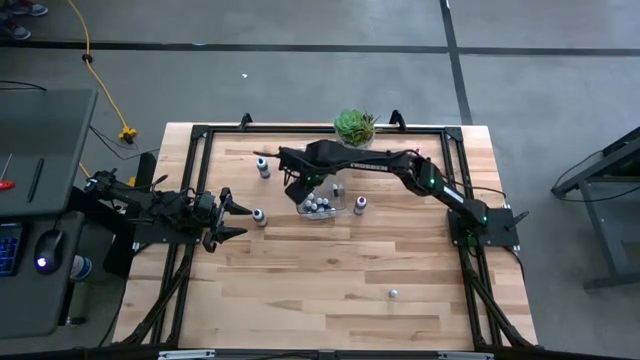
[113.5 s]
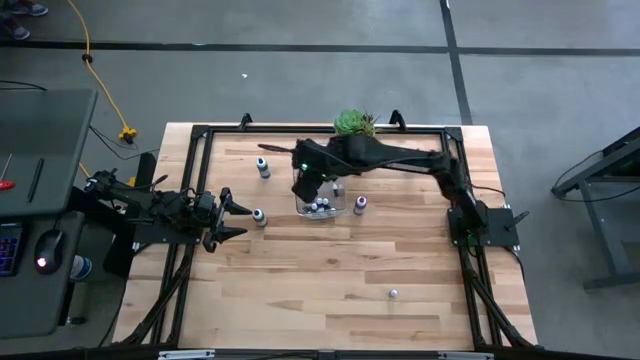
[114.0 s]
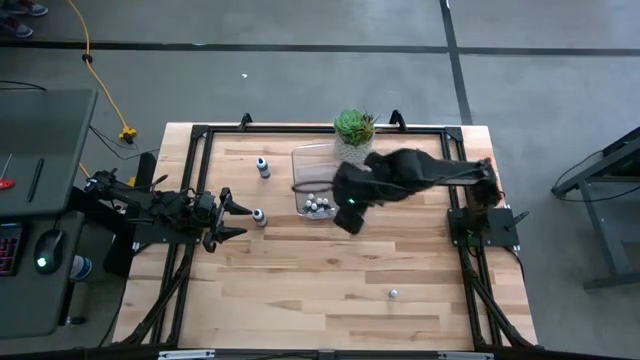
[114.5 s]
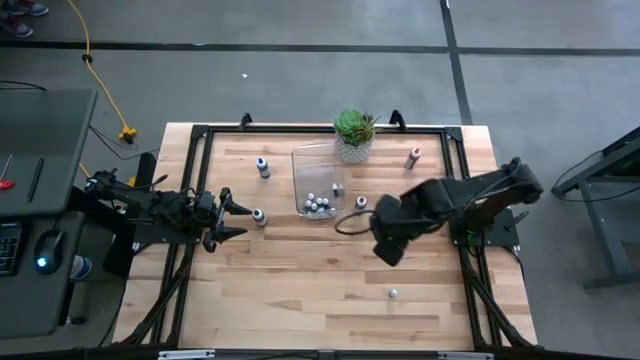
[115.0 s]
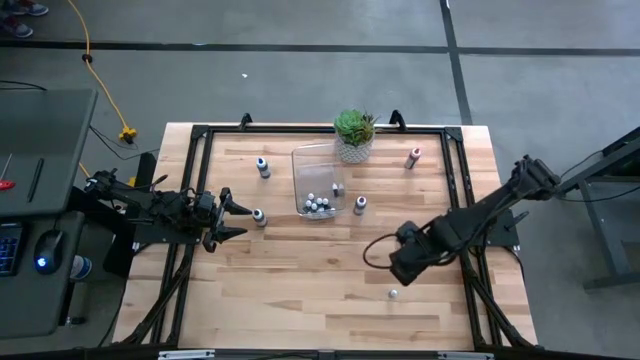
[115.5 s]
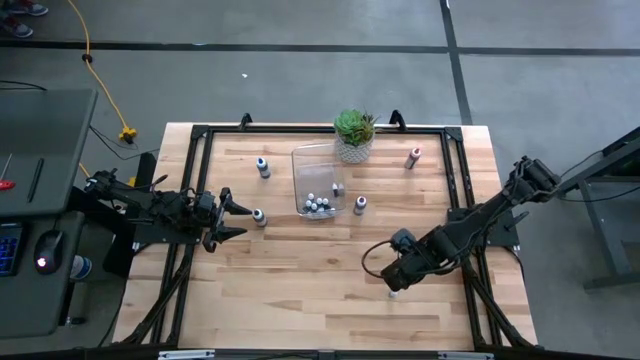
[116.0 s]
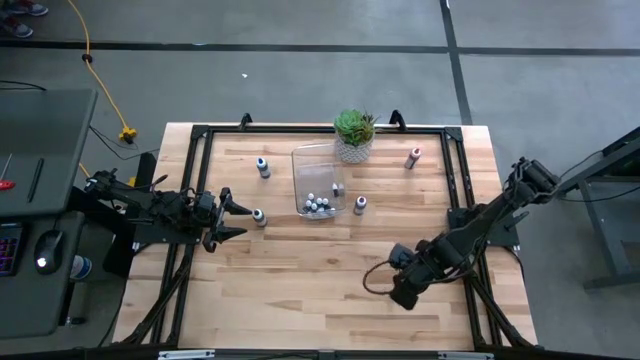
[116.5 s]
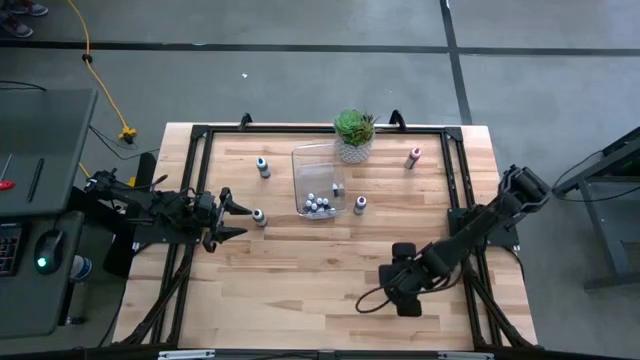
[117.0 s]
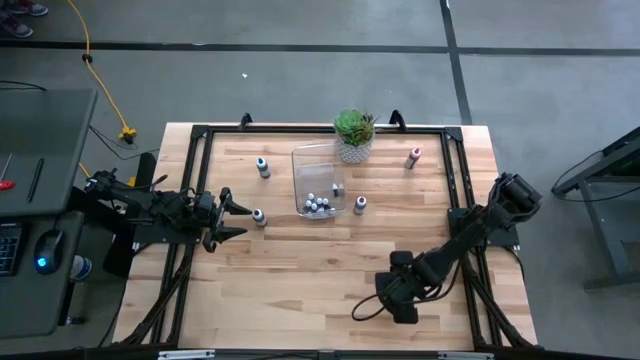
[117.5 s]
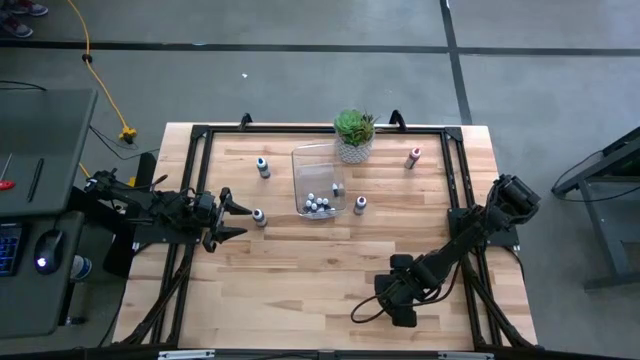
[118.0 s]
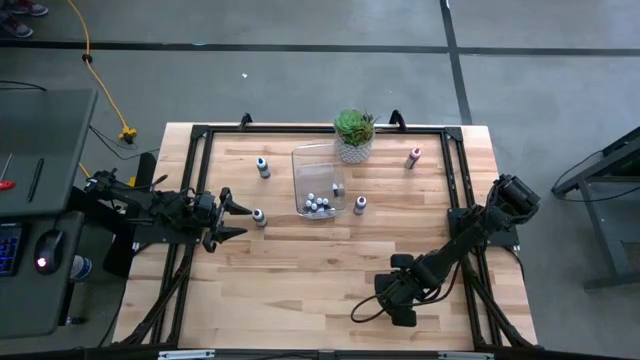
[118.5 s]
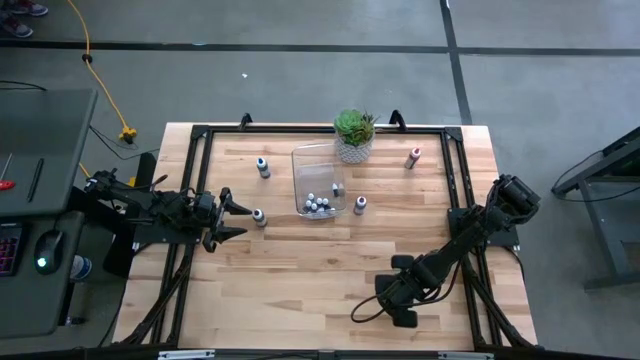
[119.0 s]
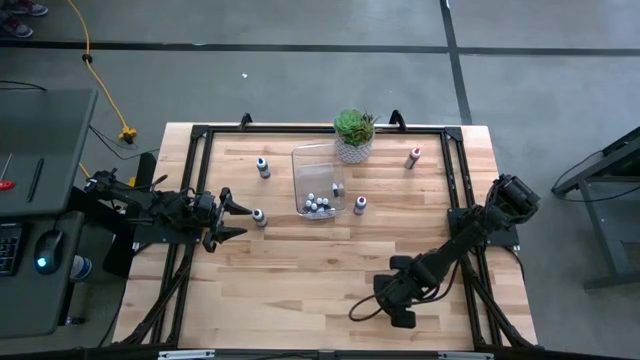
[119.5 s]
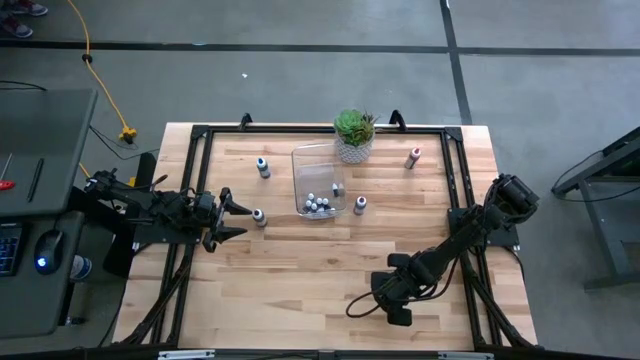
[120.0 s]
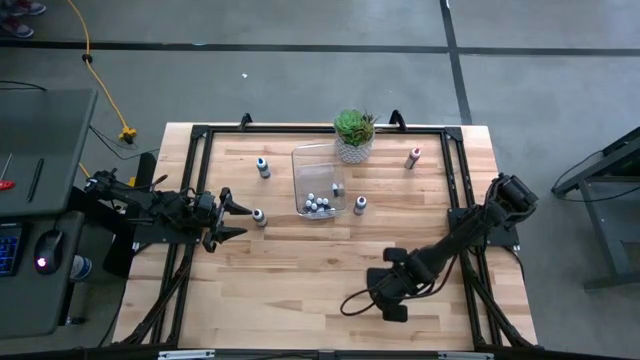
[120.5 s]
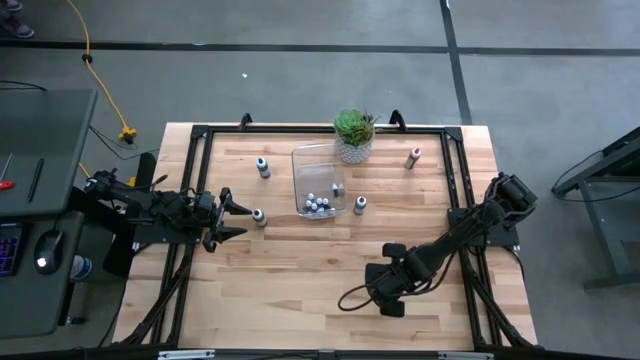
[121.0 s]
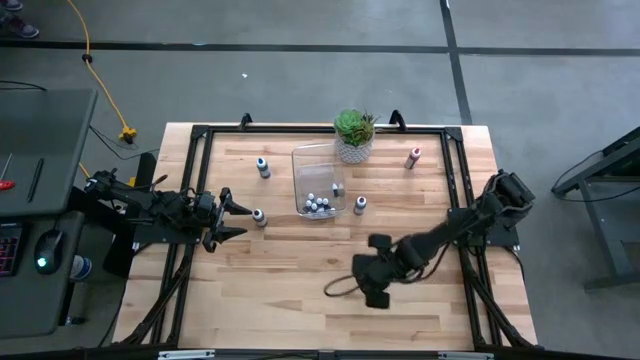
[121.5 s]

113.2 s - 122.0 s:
Task: Pick & Place food coloring
Put the small blue food coloring bottle into the transparent bin

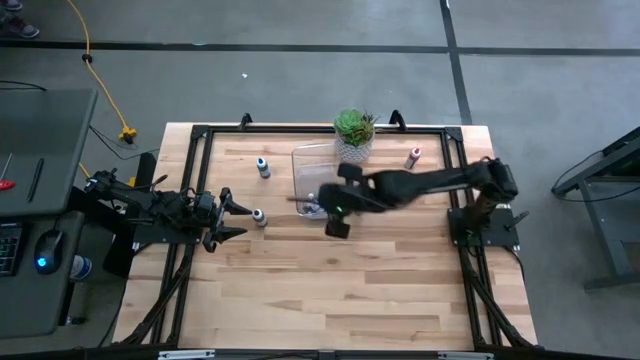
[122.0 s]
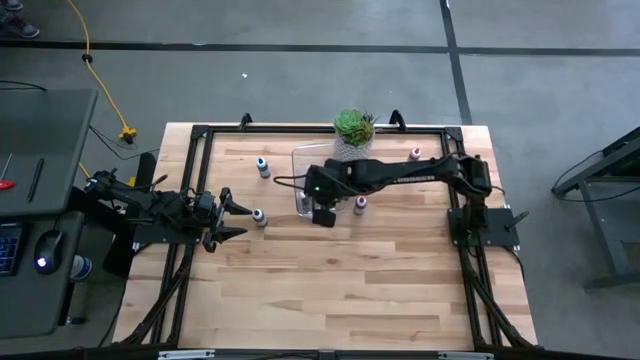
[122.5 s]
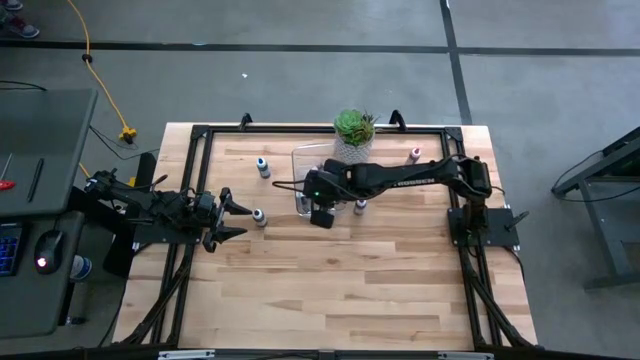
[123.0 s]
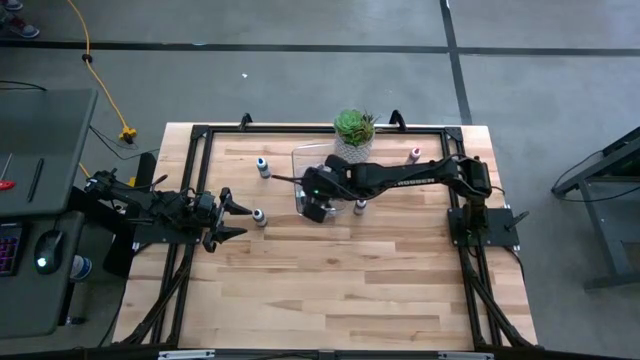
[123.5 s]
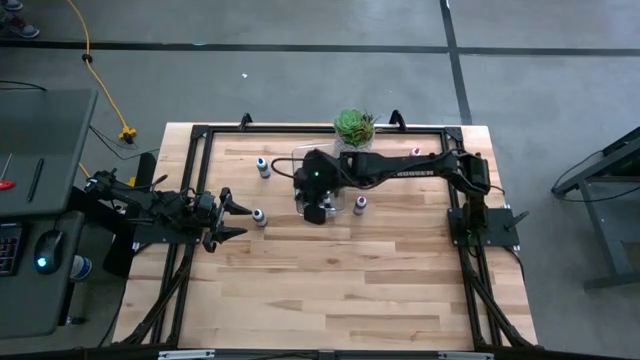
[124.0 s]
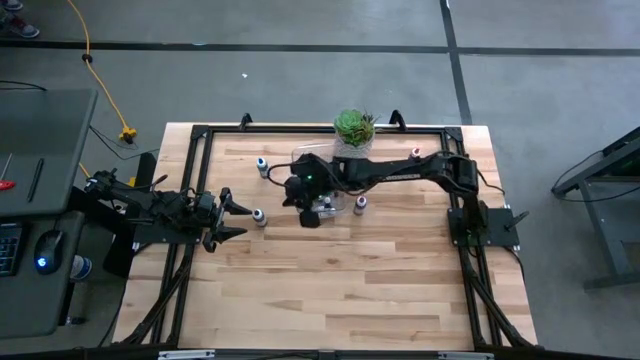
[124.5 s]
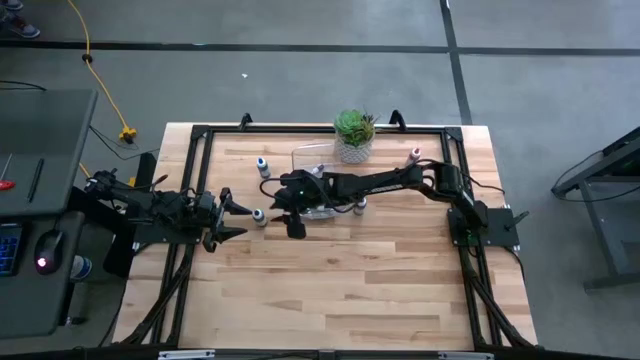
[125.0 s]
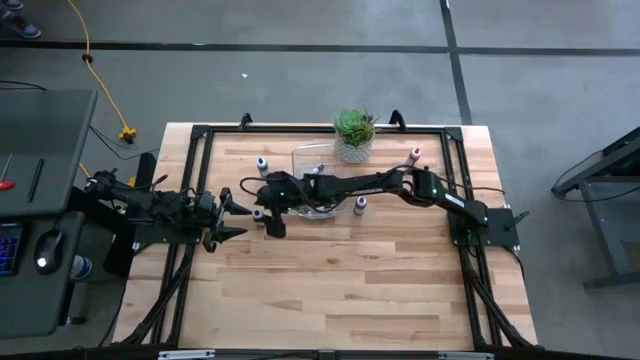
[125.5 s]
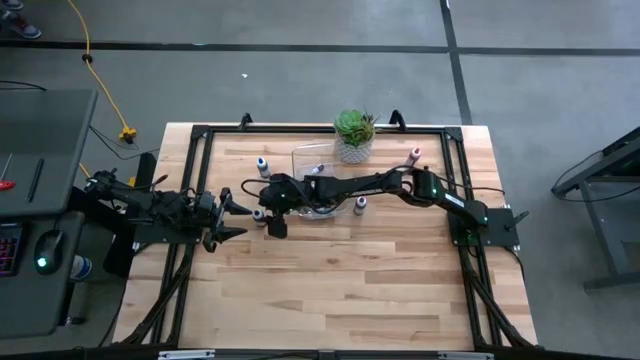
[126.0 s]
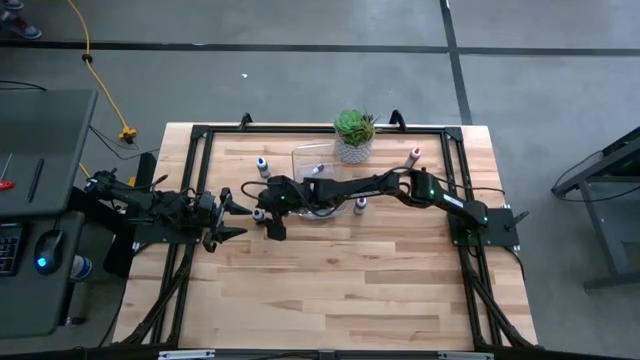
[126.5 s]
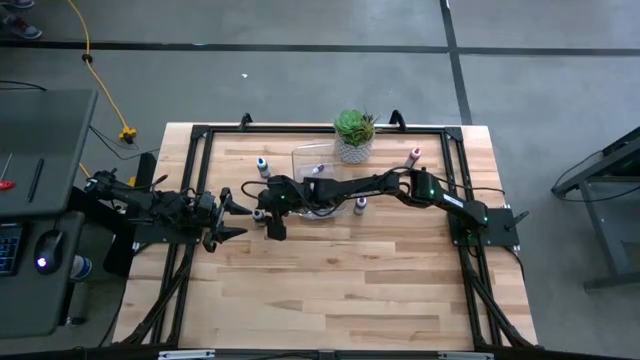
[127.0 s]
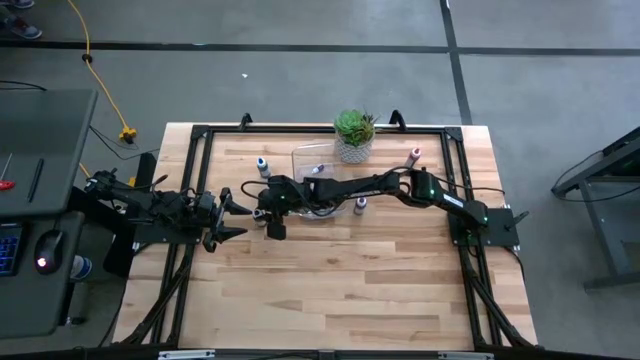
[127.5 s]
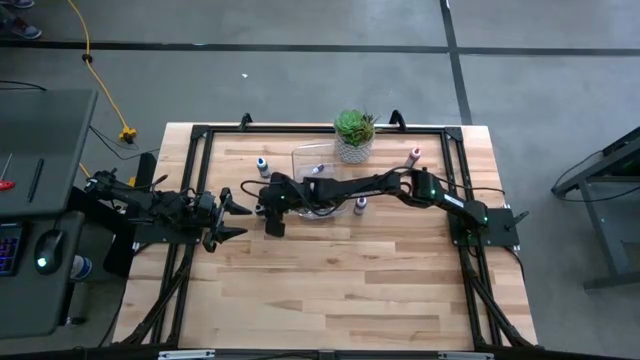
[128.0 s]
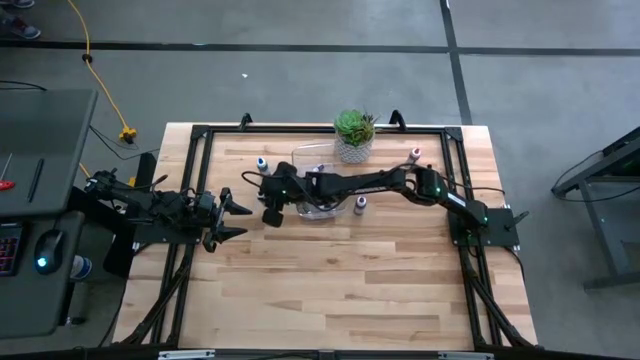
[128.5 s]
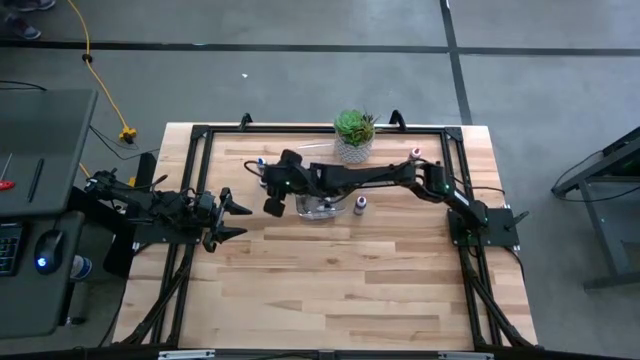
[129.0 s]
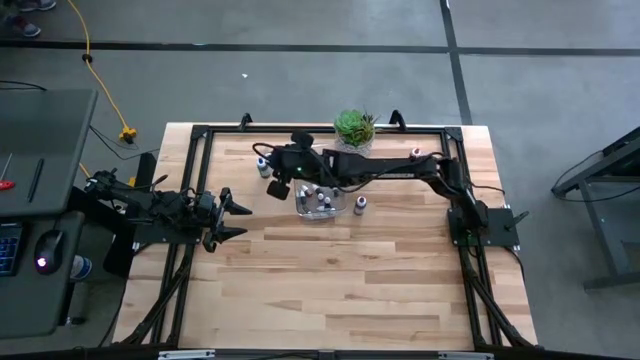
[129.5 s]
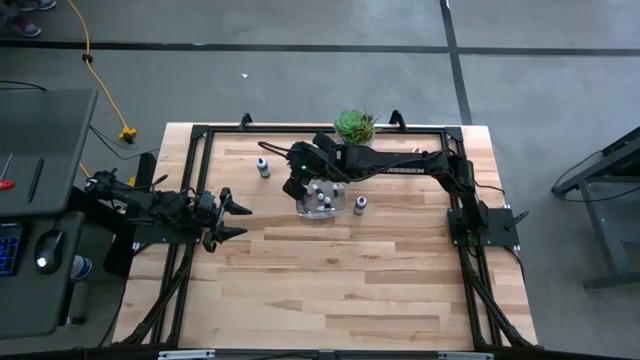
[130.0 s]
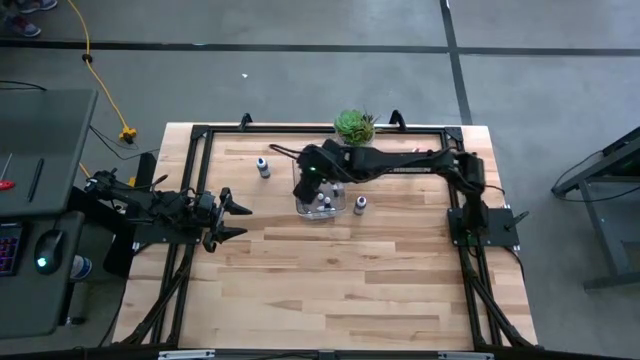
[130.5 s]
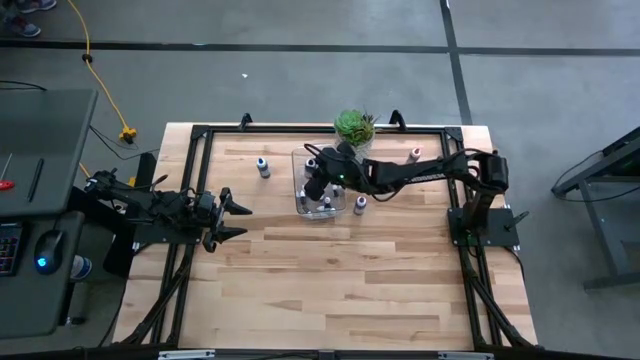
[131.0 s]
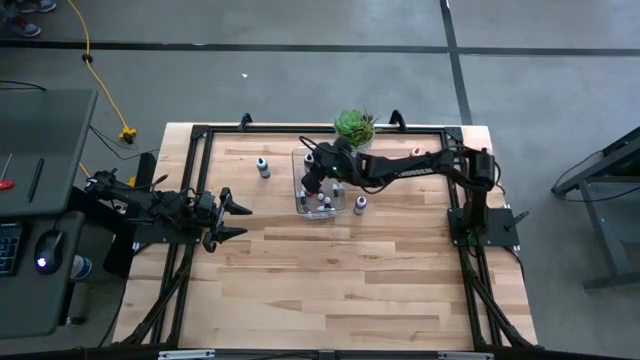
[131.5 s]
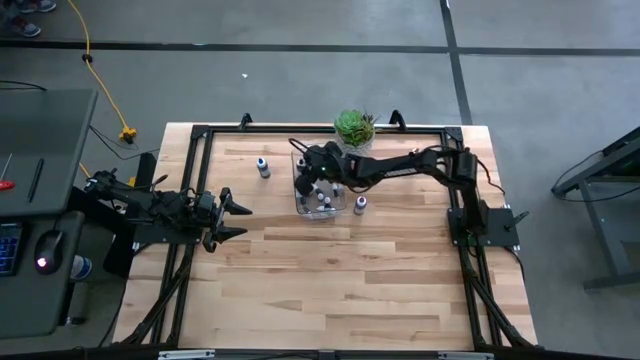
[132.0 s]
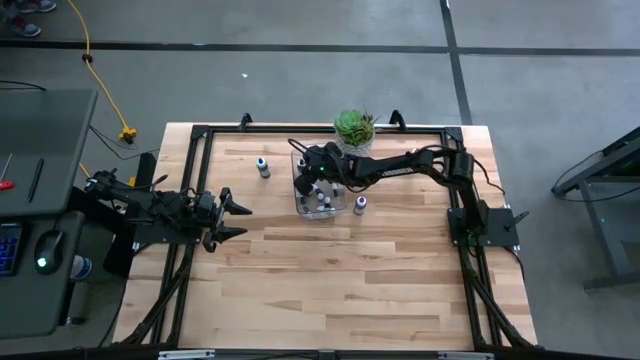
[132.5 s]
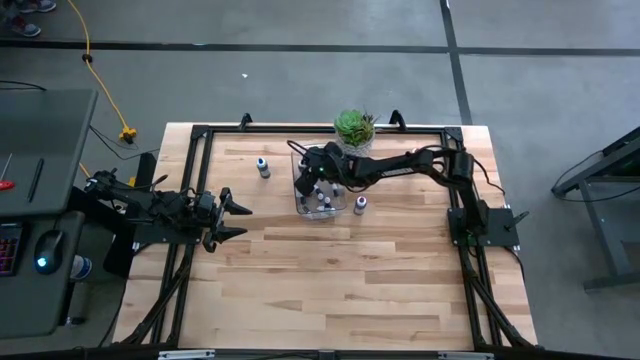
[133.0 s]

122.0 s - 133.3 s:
Put the big black food coloring bottle into the transparent bin
